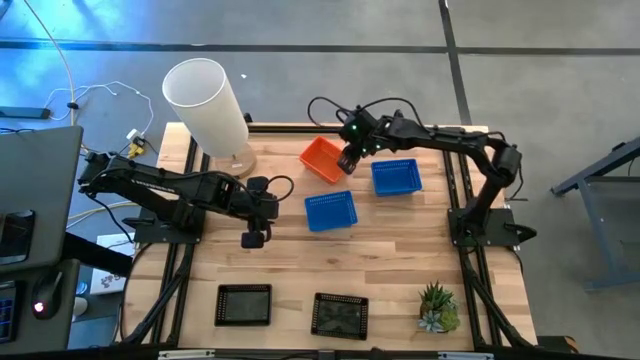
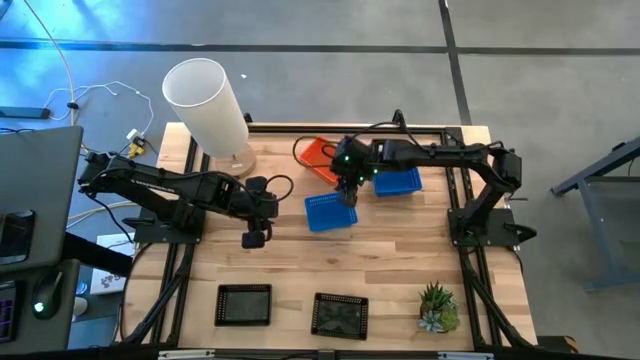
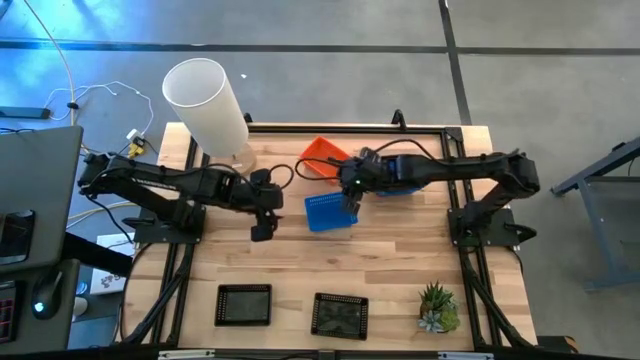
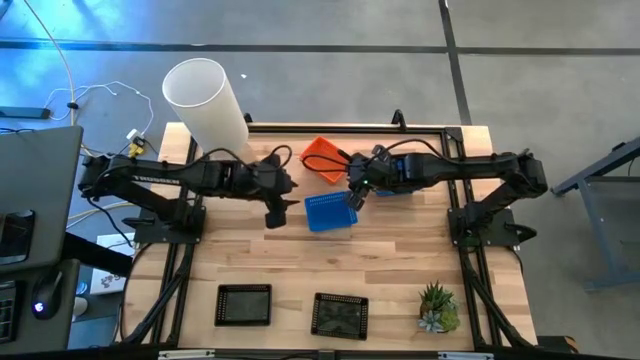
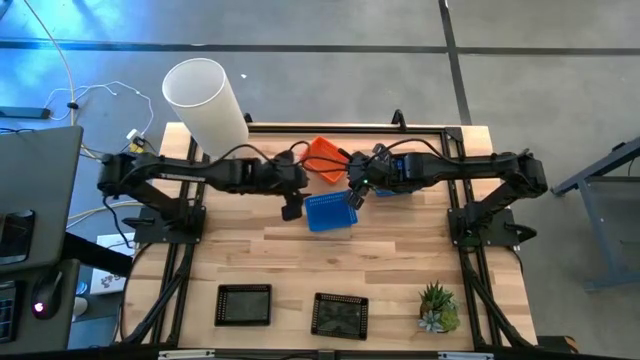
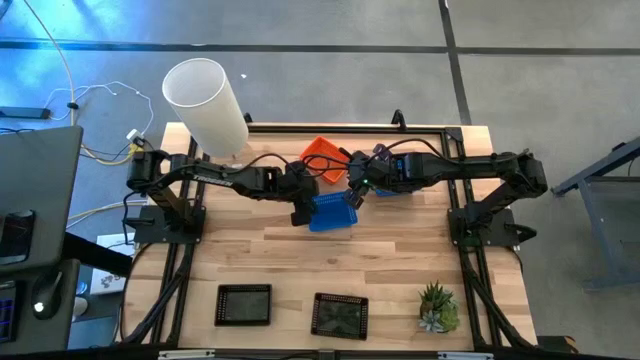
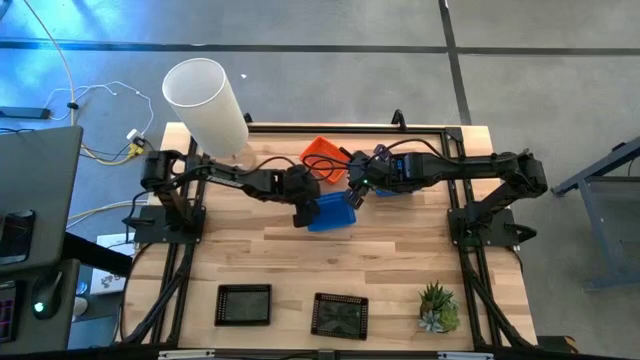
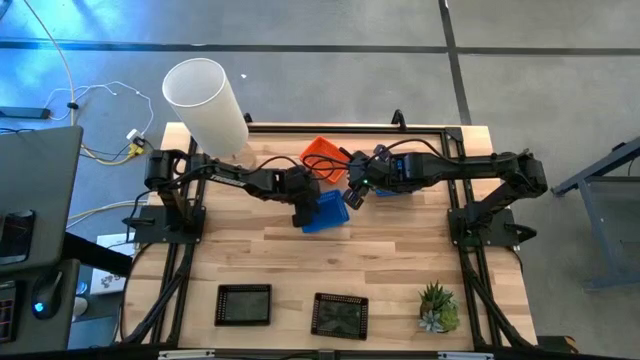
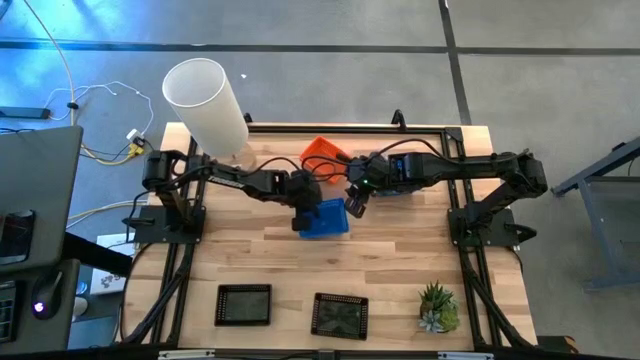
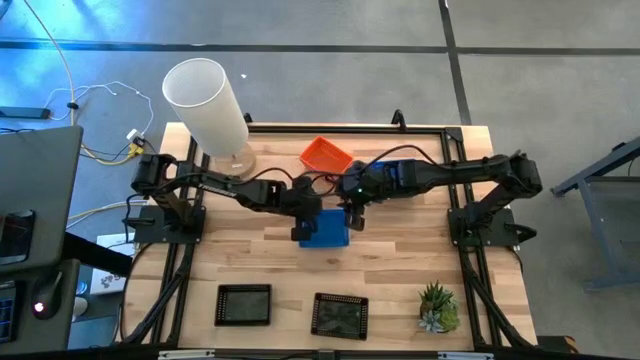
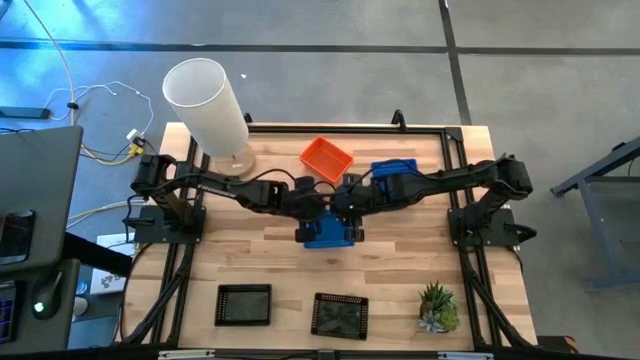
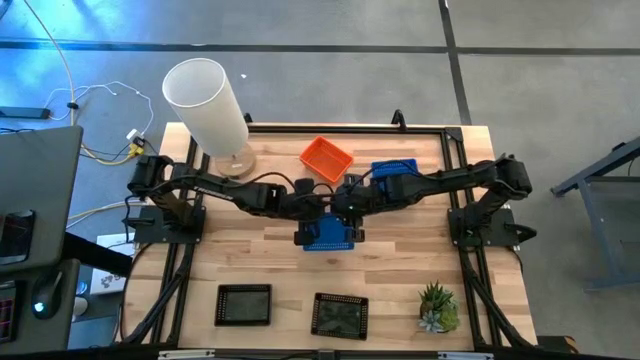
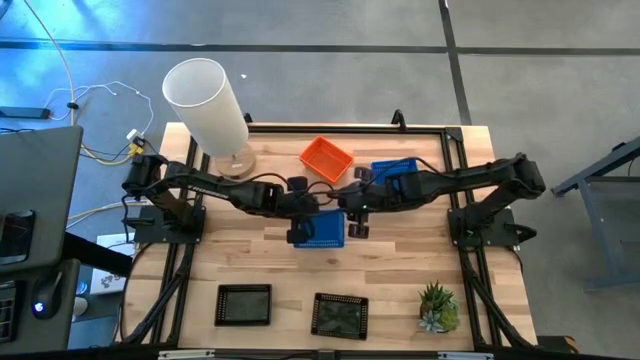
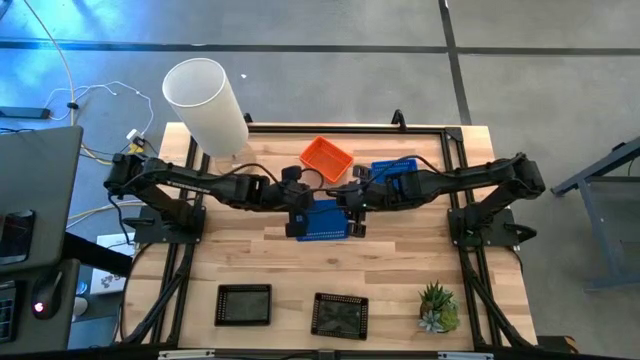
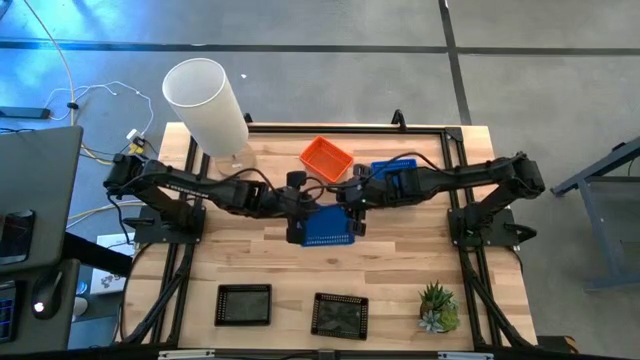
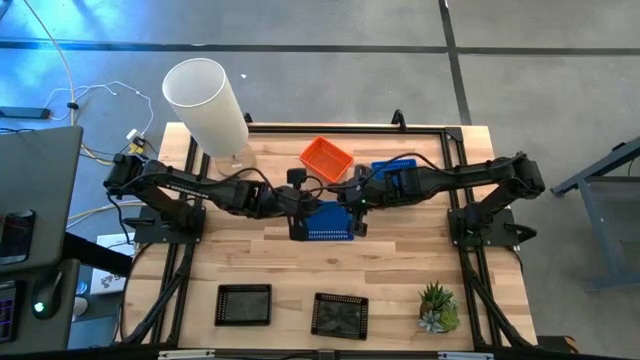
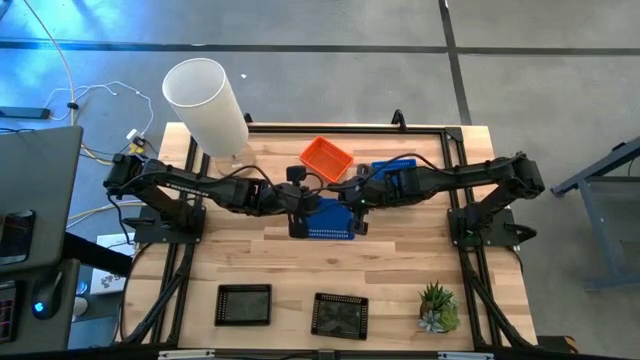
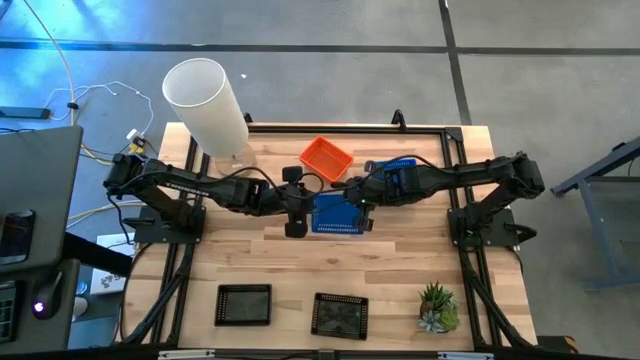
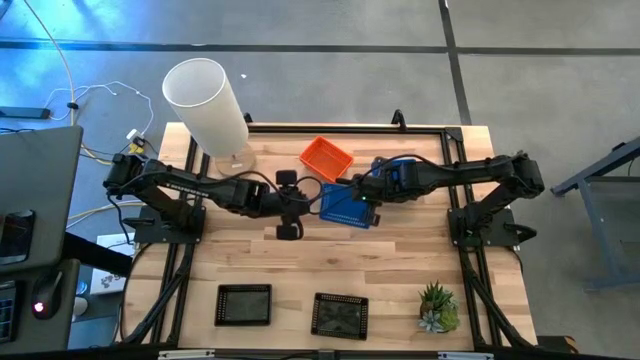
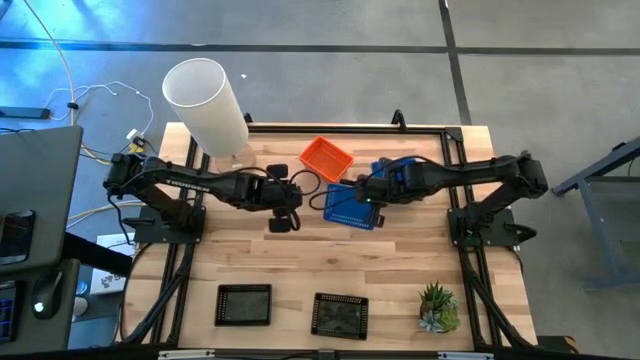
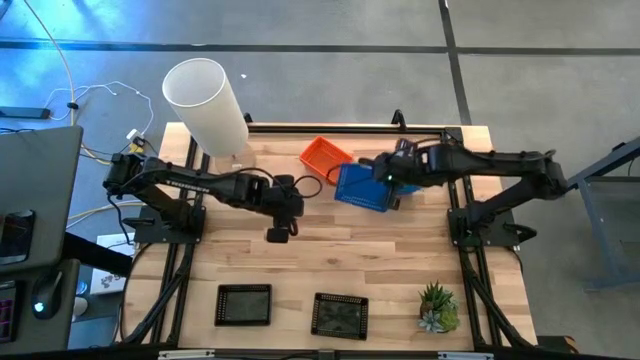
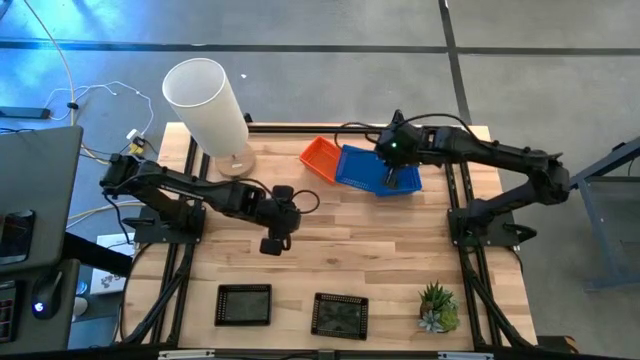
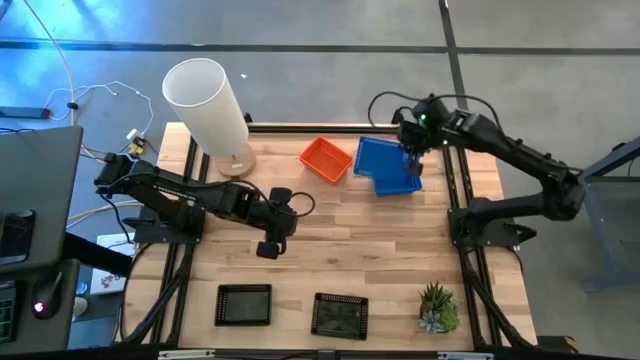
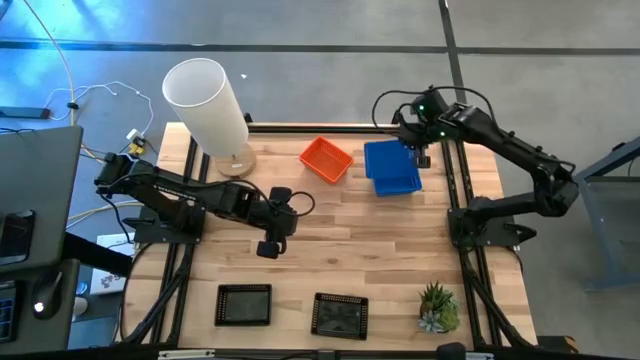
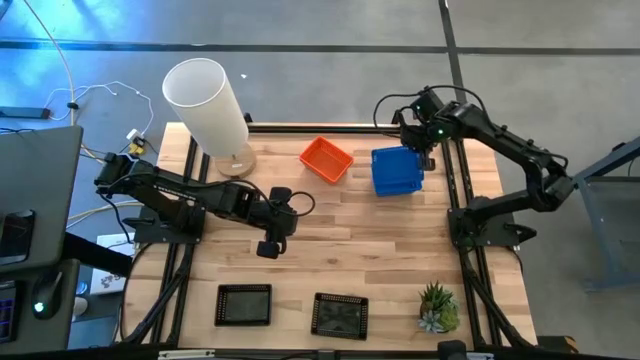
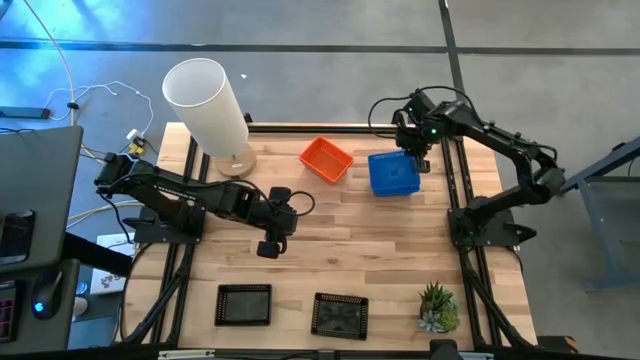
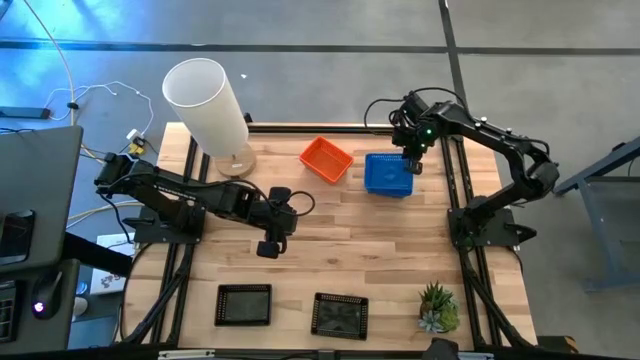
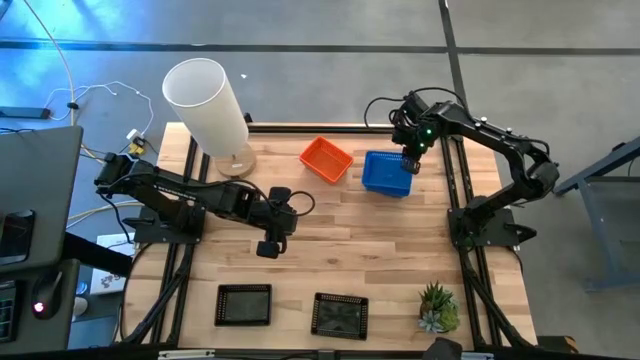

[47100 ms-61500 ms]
Stack the left blue bin on top of the right blue bin
